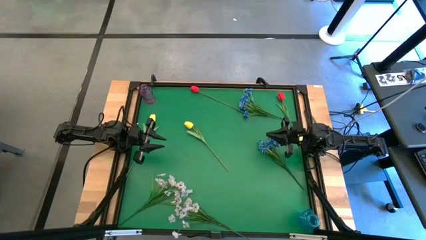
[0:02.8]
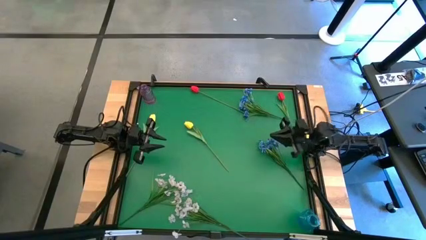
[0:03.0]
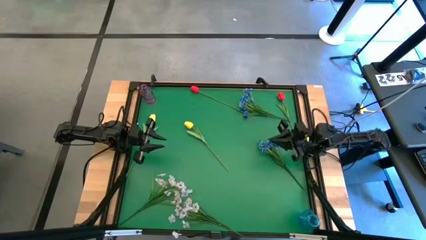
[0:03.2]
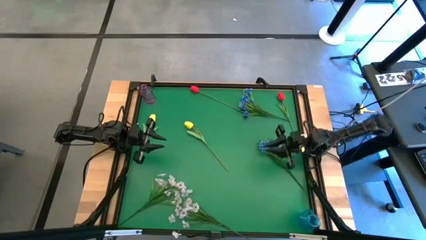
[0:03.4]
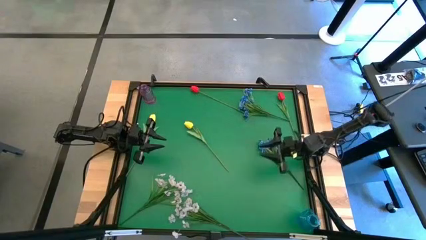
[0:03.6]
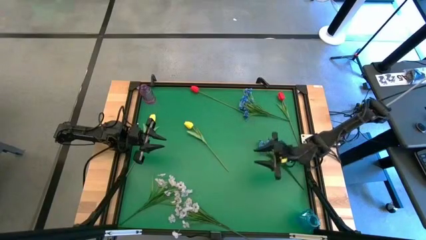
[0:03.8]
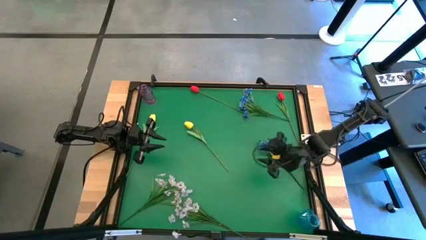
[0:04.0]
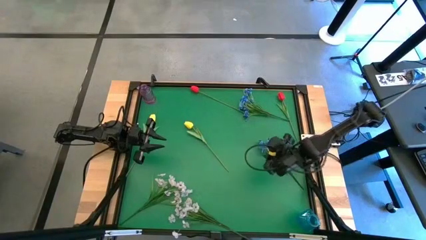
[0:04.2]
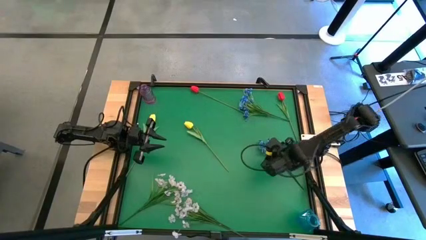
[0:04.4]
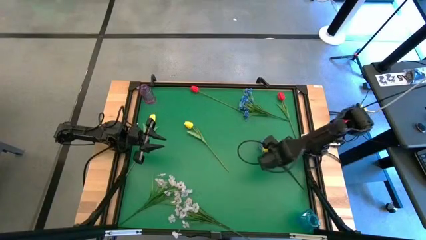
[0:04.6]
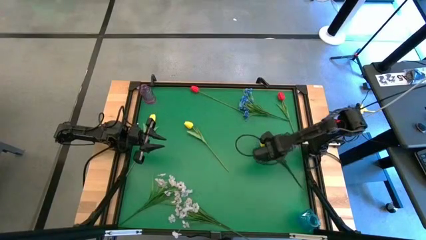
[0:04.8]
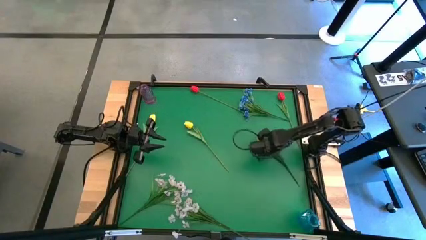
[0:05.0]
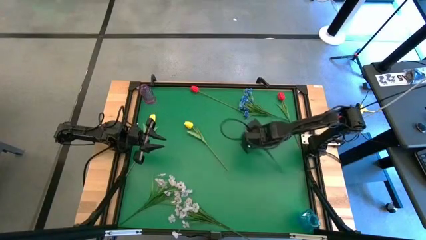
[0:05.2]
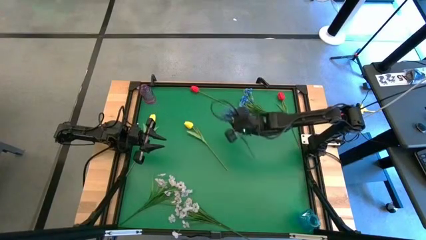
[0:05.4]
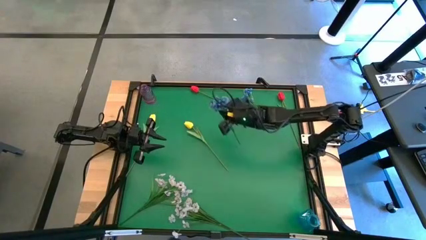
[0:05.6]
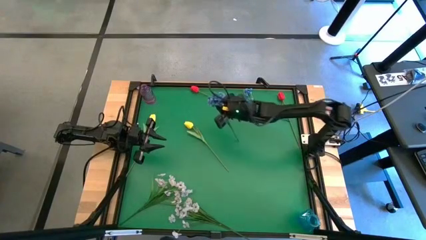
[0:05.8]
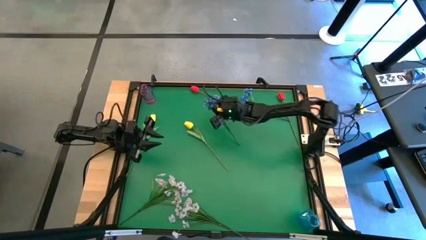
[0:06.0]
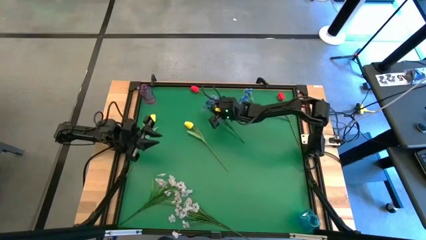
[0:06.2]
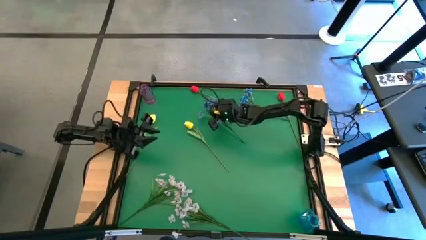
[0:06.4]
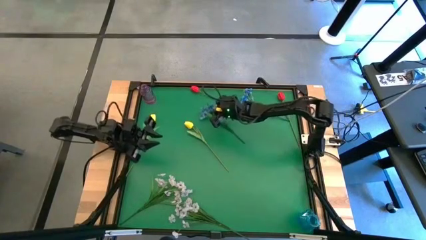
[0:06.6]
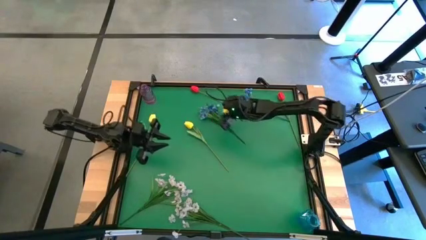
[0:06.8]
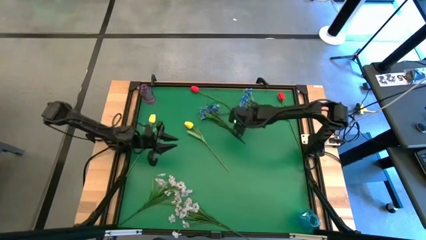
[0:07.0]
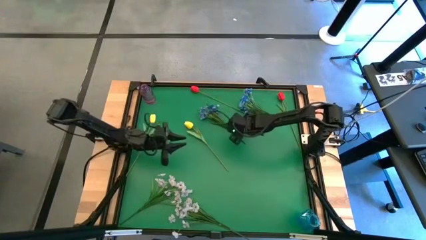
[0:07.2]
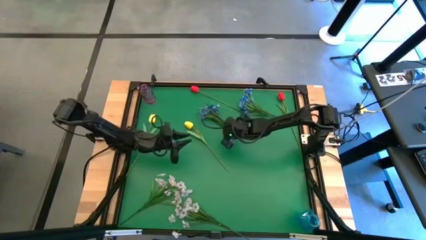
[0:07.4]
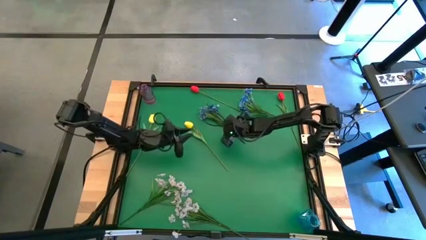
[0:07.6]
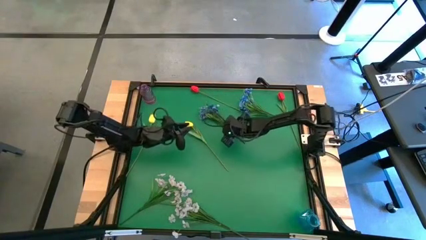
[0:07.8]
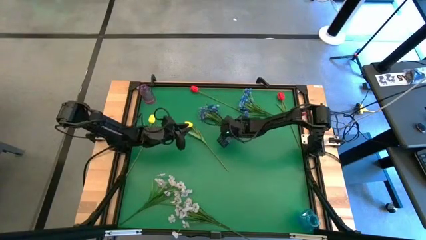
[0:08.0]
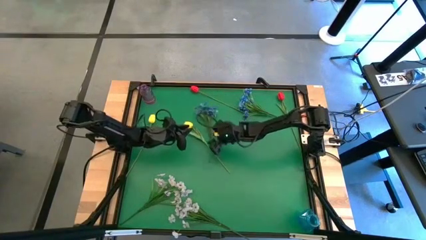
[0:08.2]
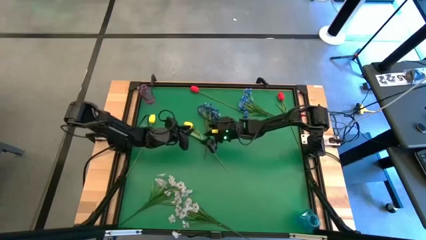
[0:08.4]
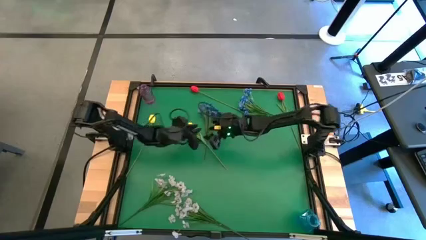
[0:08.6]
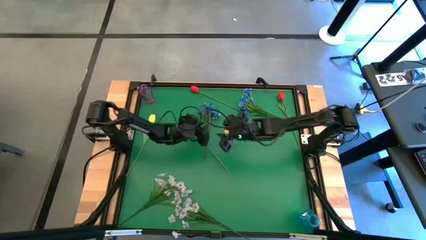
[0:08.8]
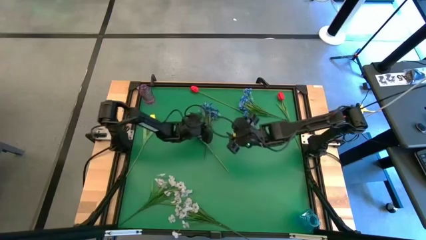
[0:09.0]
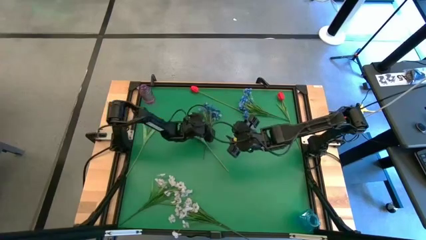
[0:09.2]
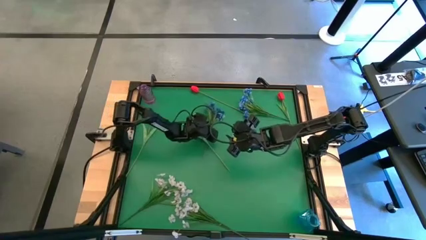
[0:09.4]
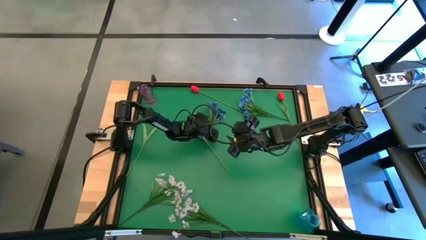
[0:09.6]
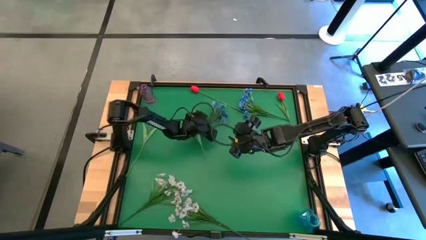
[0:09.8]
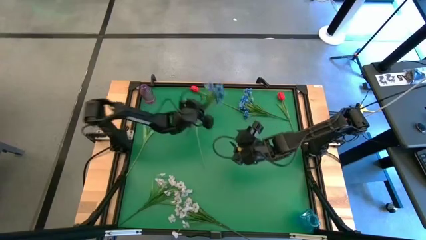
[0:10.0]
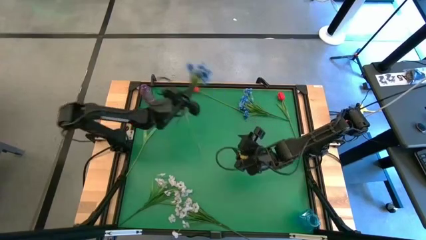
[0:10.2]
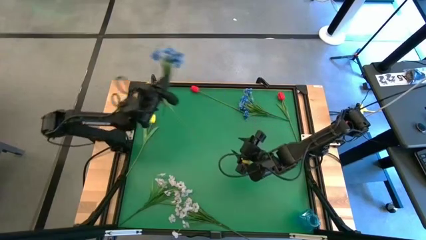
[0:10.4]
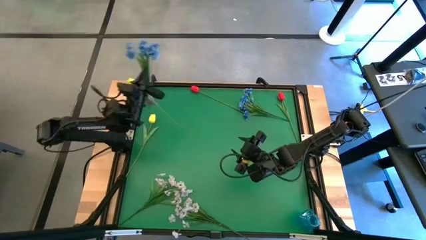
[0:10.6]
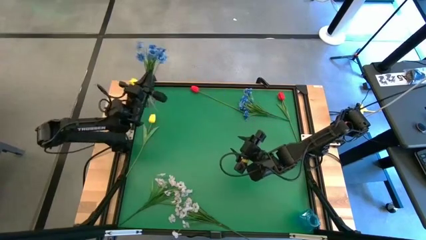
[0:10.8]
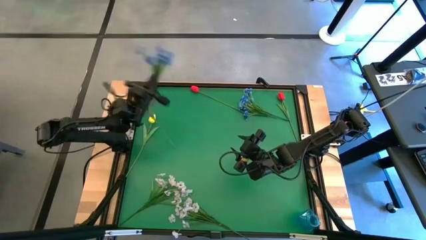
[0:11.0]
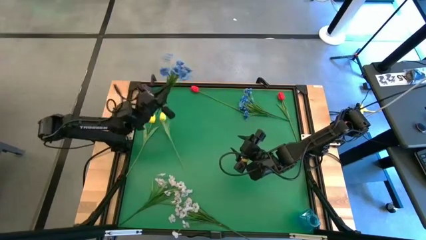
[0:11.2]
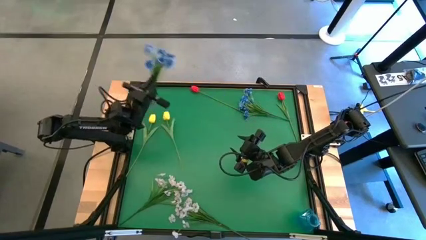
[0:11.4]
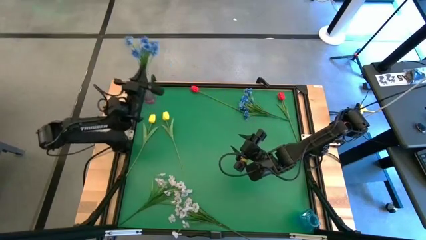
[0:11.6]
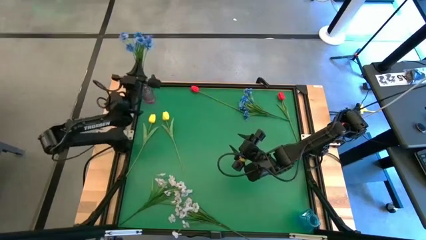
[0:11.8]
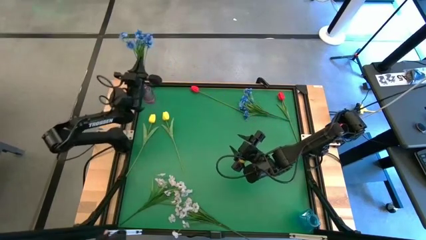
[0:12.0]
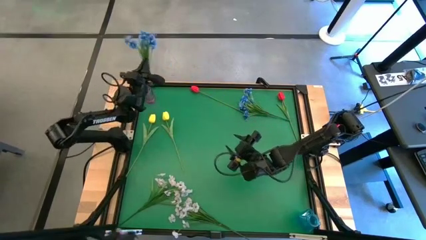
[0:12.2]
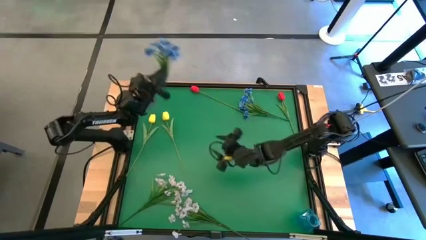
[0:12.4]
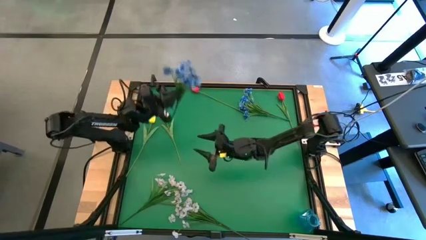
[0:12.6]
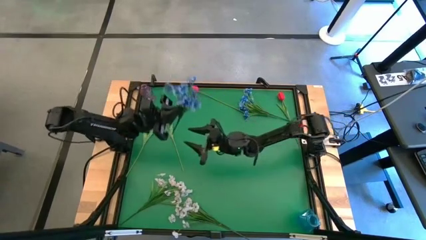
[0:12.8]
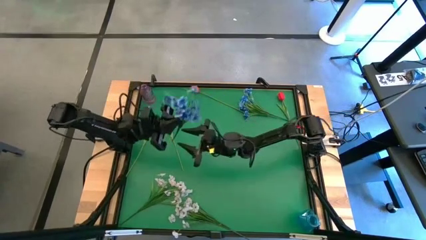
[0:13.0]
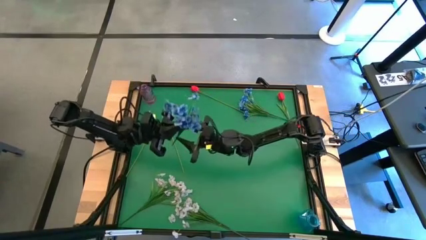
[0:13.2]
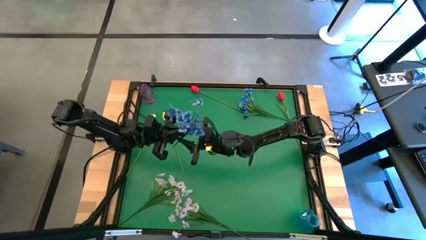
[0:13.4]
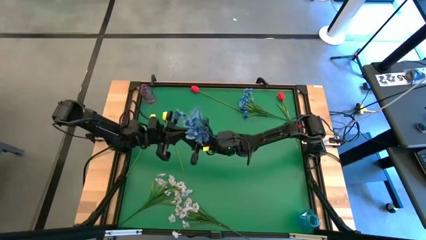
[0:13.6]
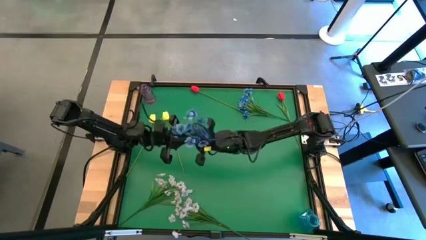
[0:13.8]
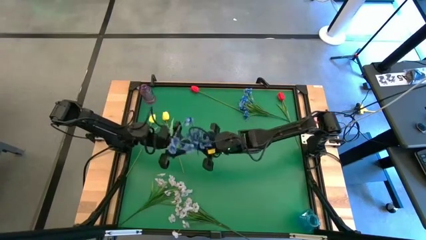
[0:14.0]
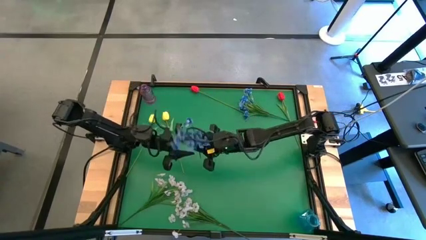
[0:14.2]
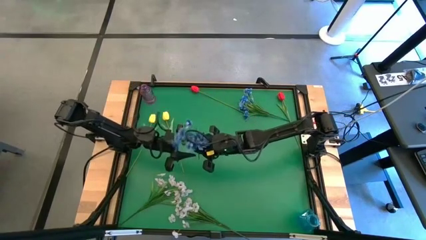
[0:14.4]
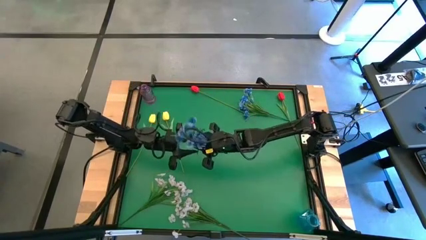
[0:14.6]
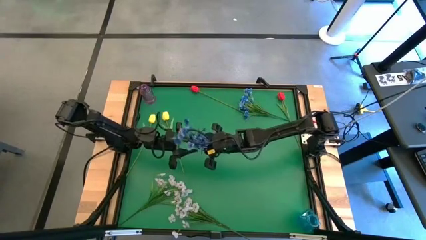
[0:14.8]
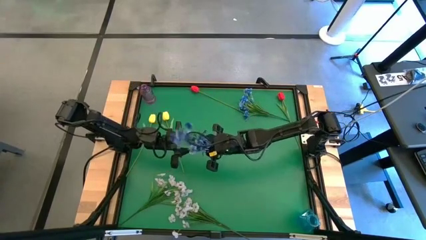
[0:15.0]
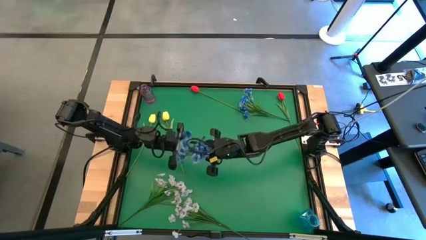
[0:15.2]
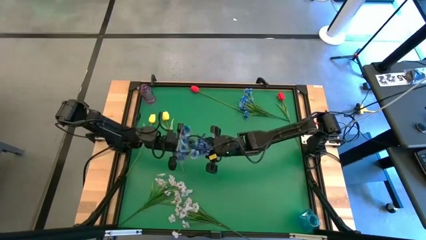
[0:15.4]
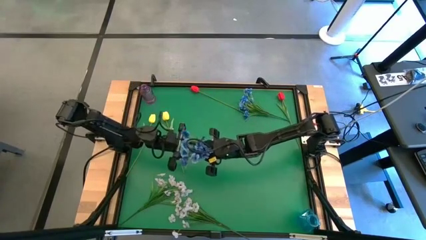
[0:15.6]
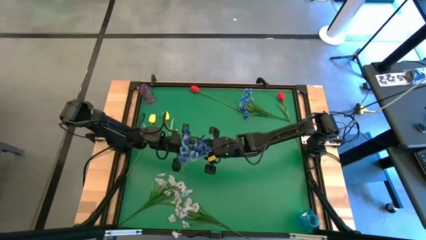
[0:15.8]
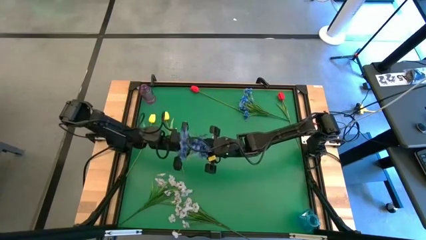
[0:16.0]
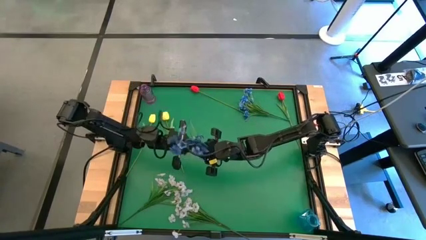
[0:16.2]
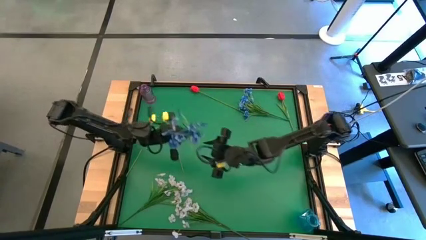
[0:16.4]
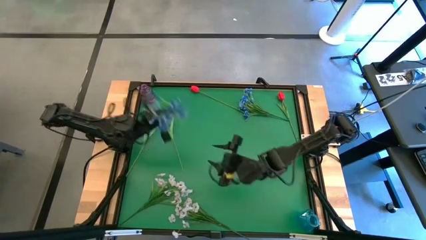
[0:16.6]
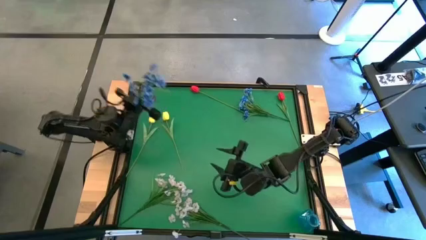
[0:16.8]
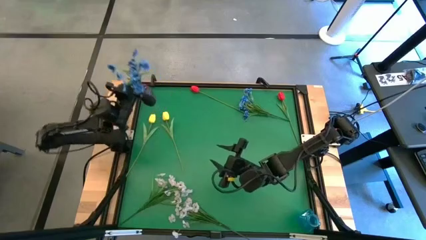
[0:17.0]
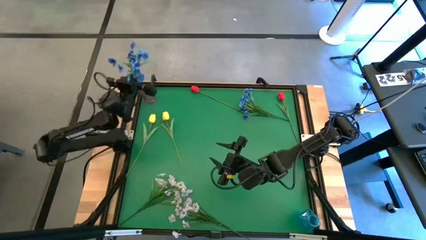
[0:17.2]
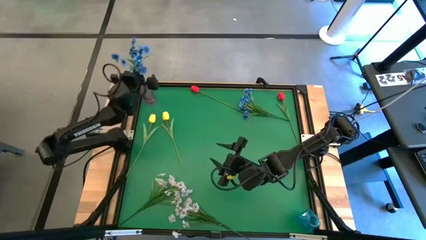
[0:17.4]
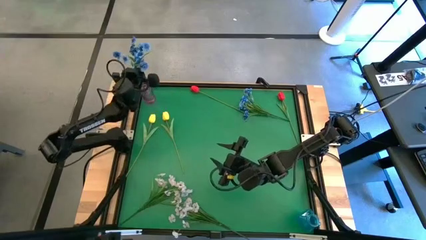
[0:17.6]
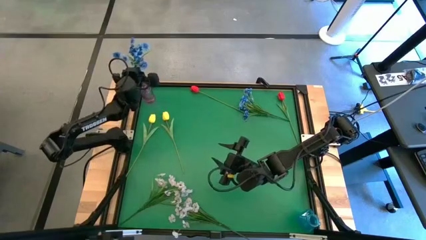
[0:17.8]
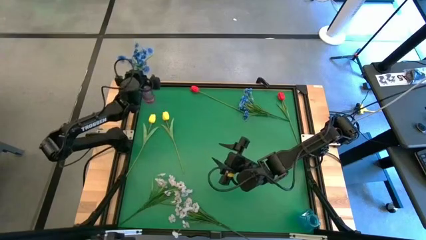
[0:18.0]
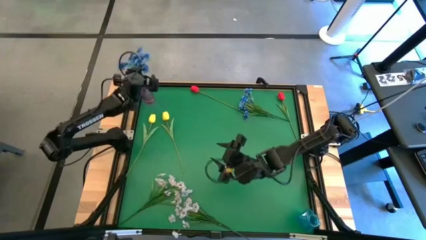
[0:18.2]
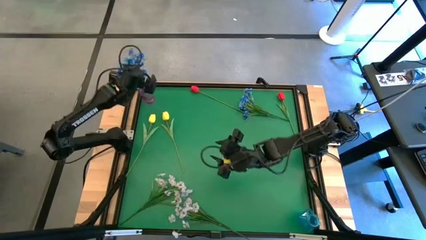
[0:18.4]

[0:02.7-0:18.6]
Task: Sort flowers into vase by color
Put the bottom blue flowers into the blue vase
